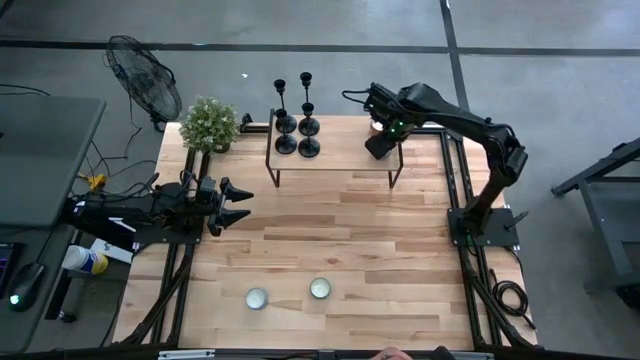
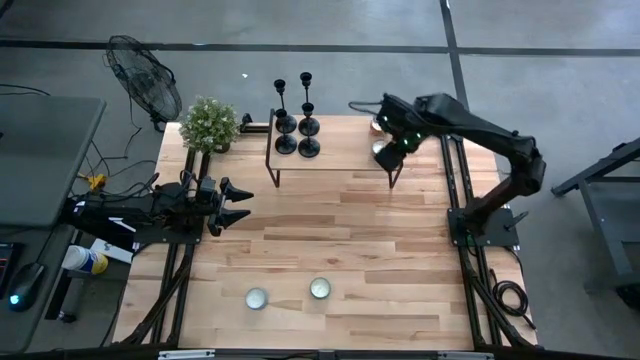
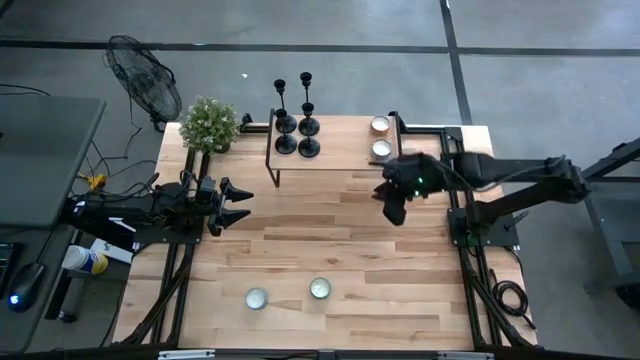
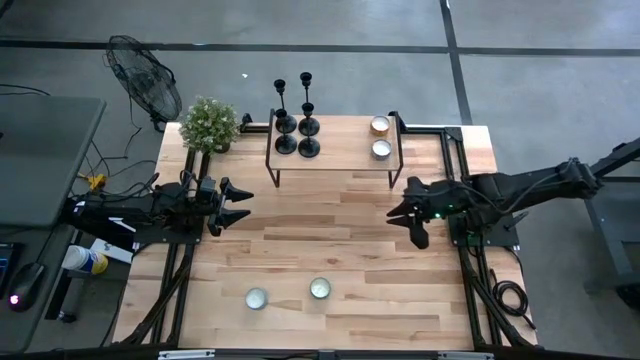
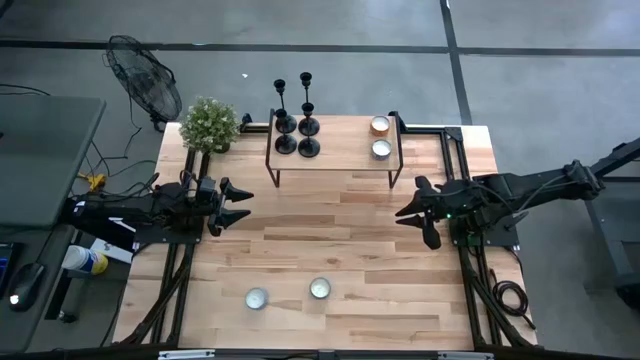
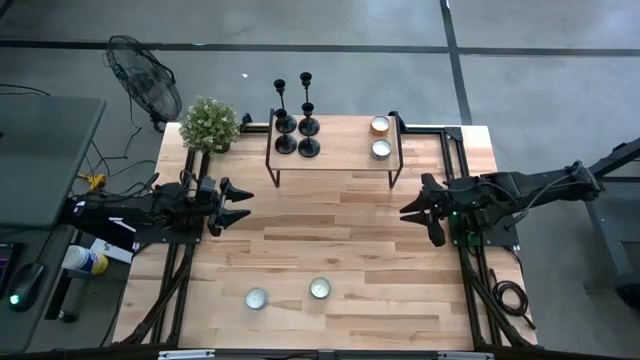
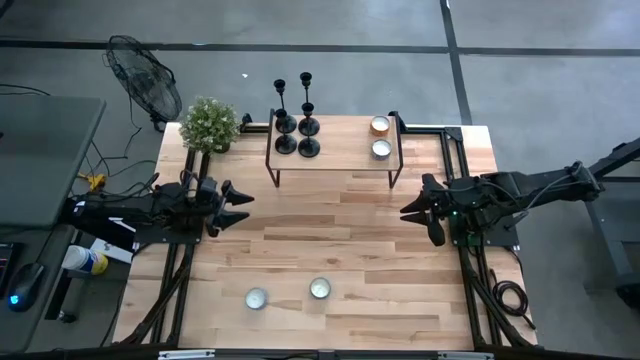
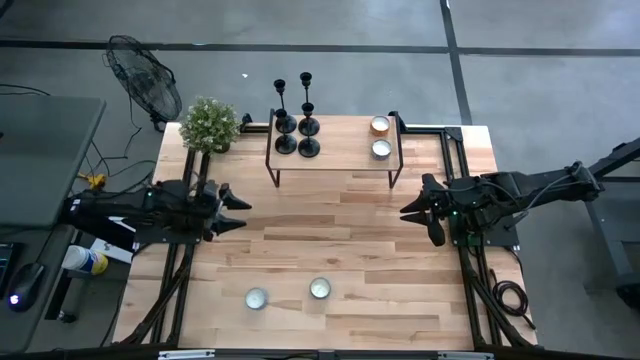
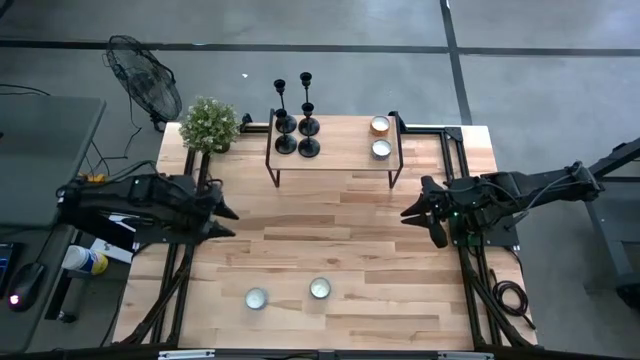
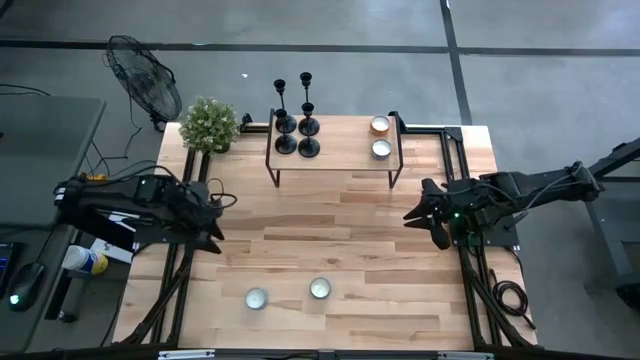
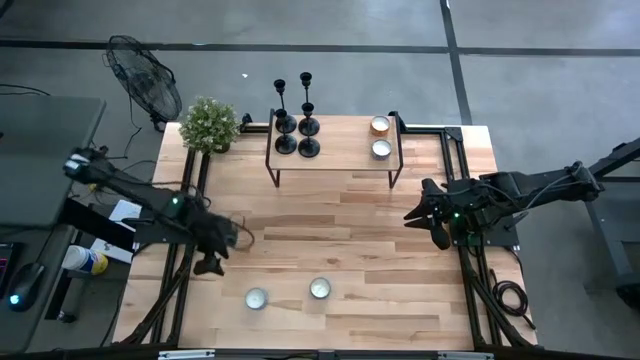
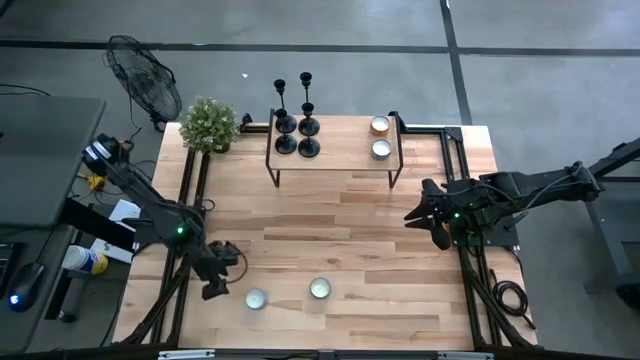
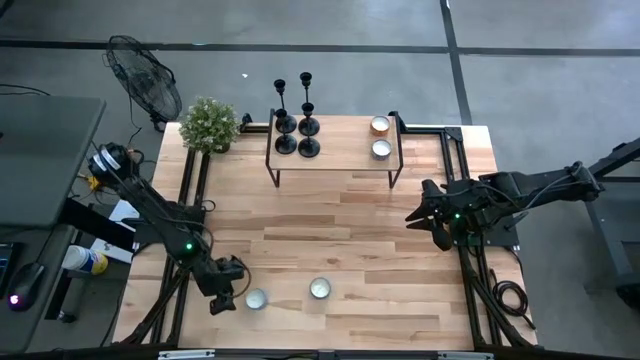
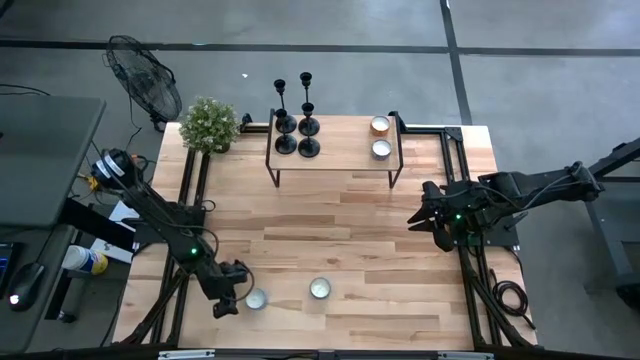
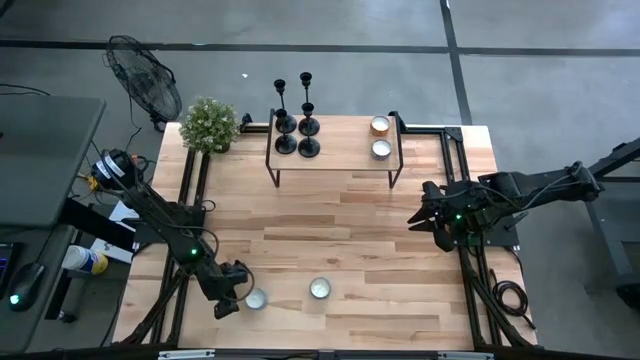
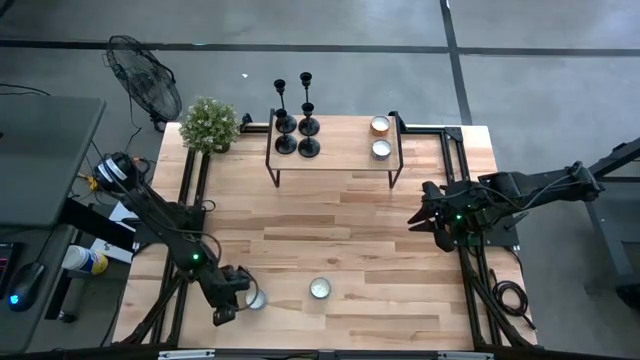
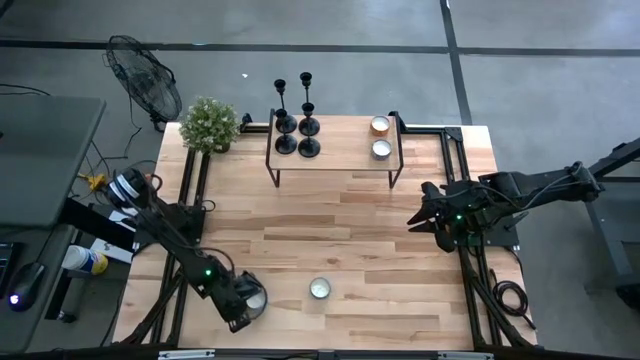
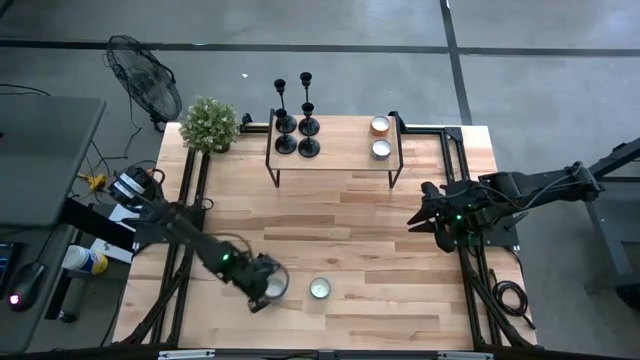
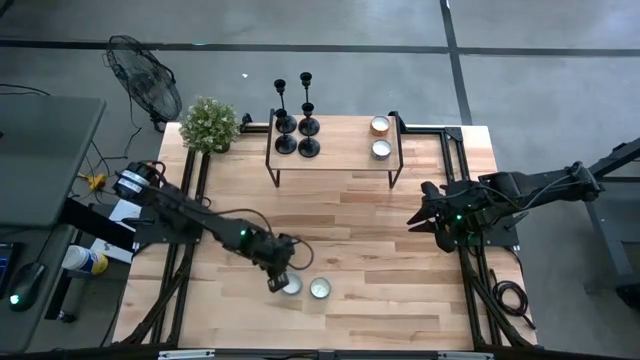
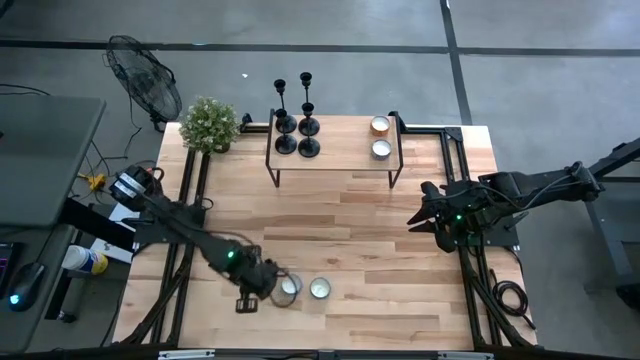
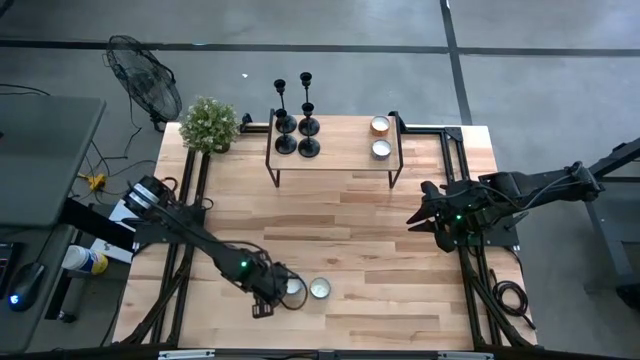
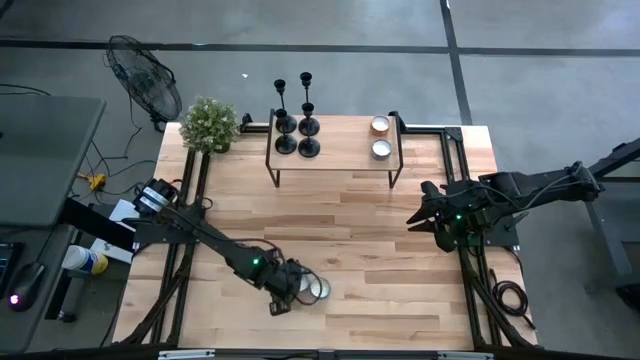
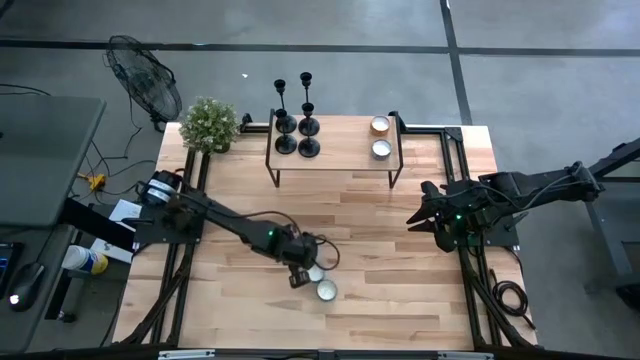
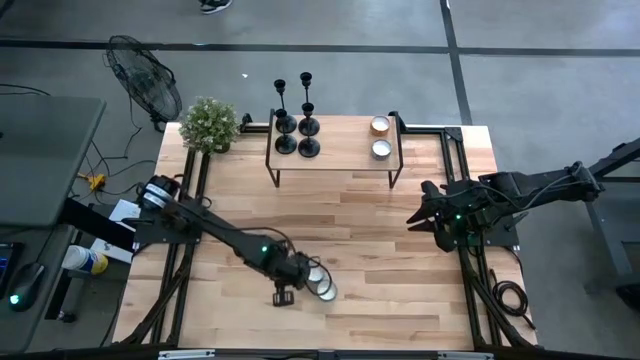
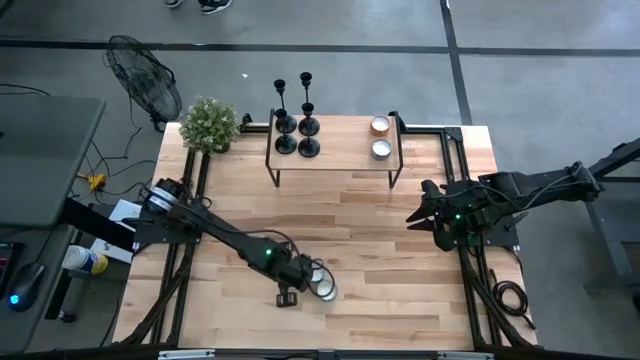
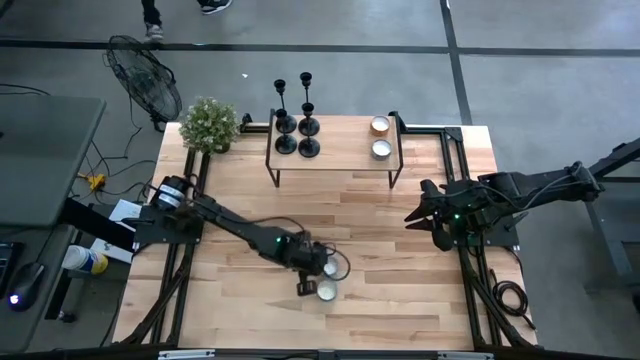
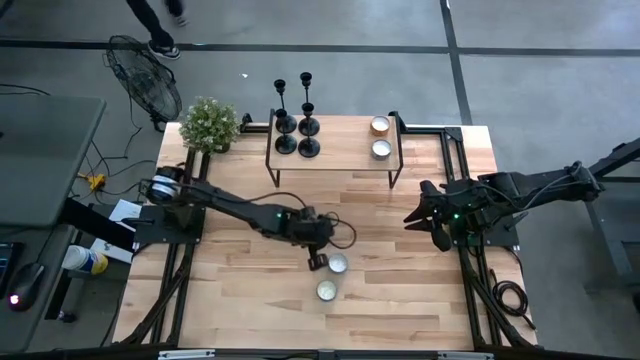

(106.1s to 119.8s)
Task: Pick & Place candle stick holders
Put the light blue scented candle on the shelf

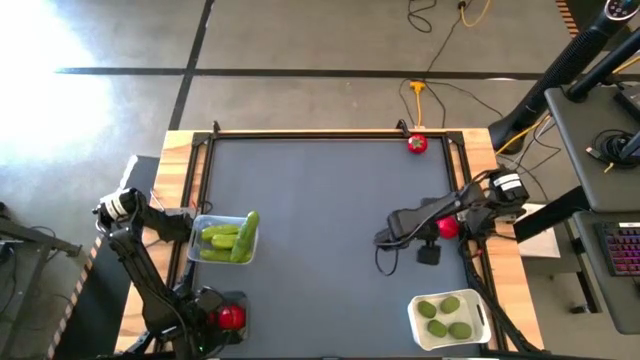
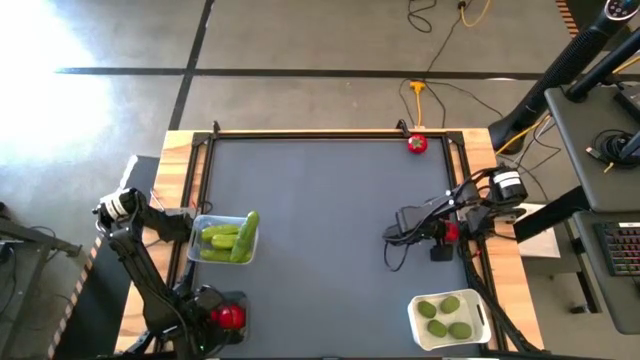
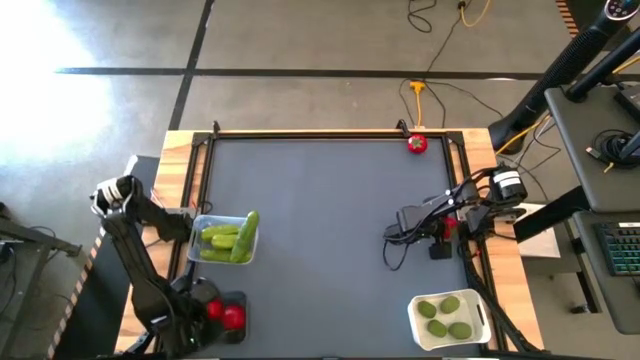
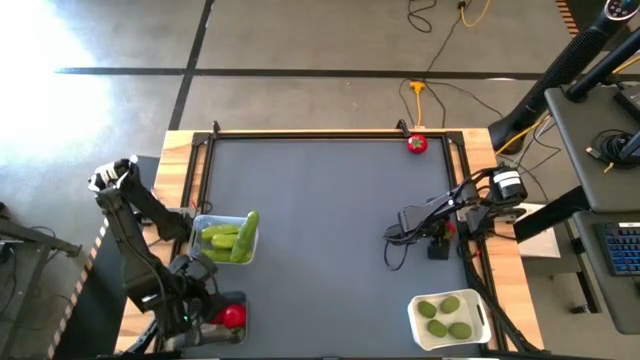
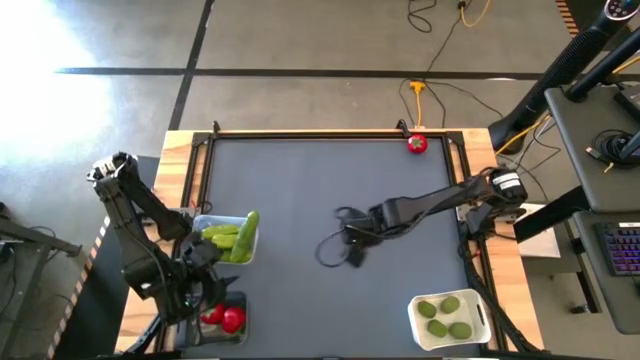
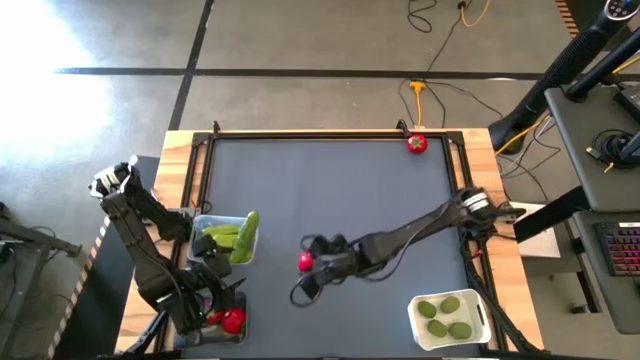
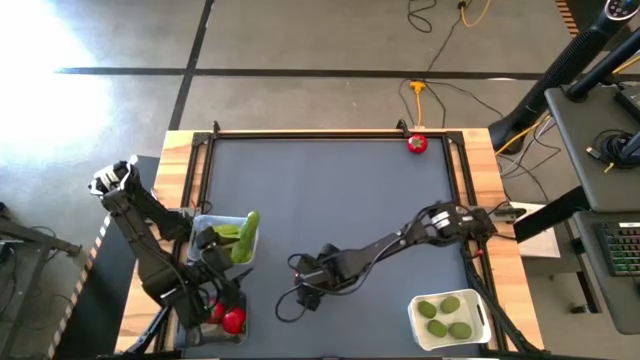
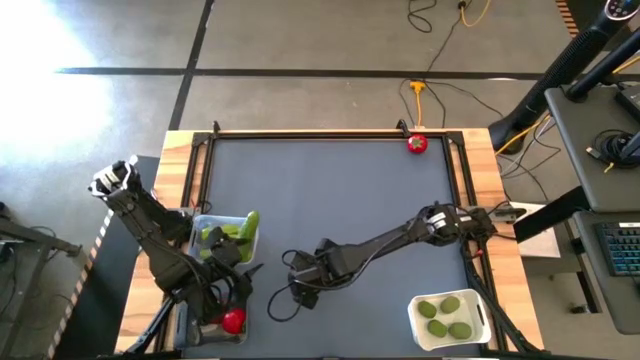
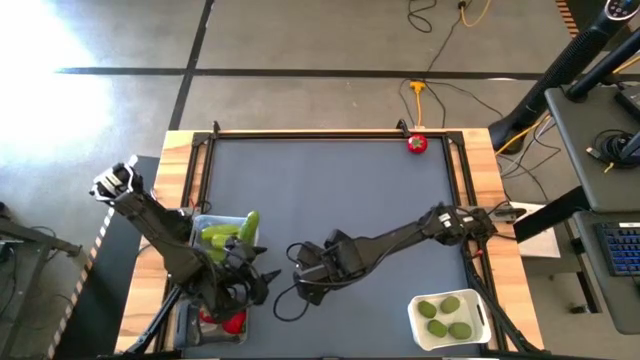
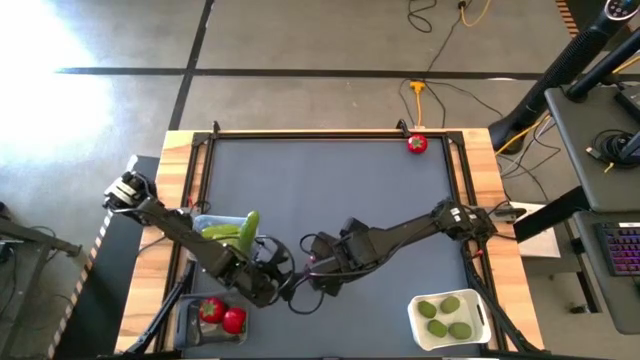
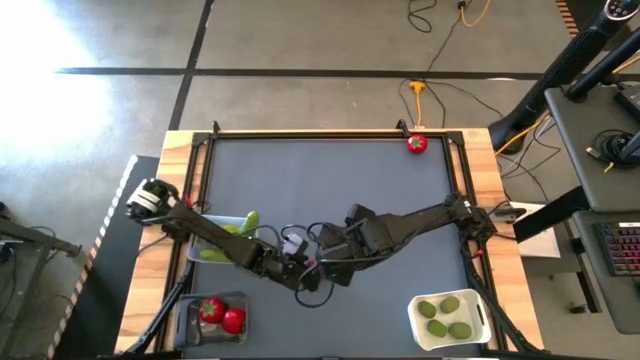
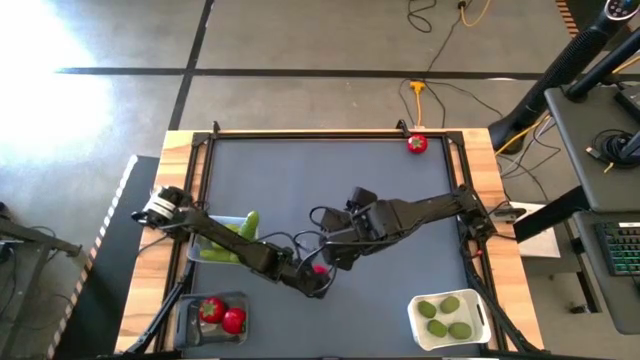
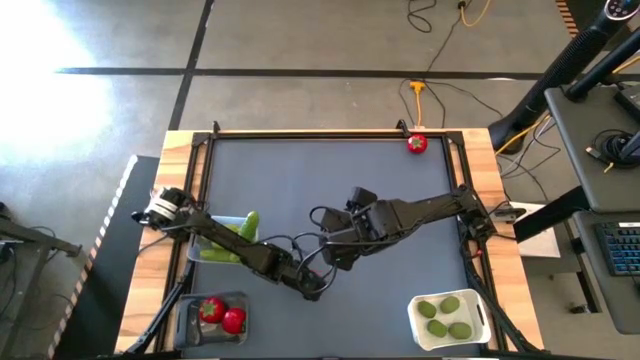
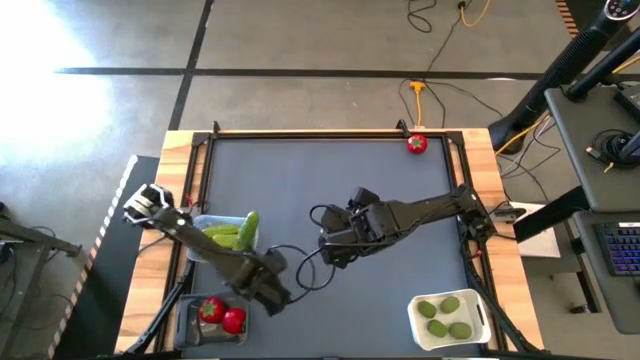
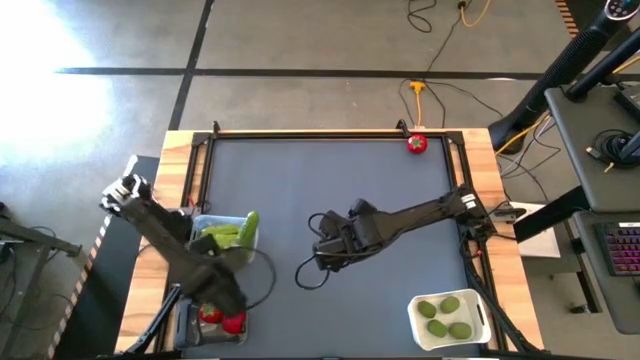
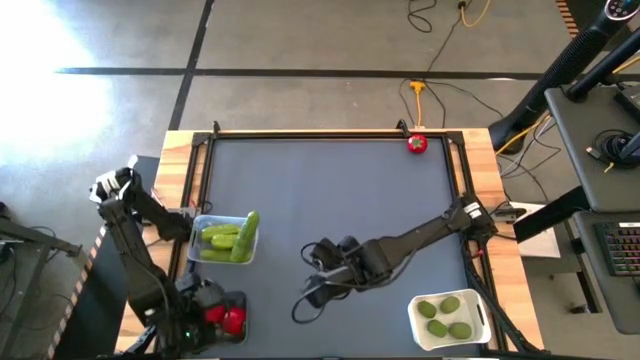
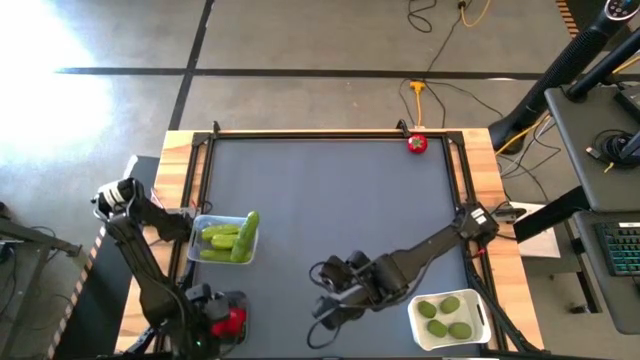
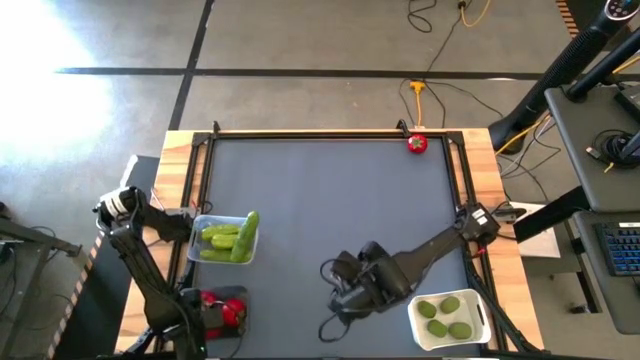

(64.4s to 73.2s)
Task: Sort produce into baskets
Put the bottom tomato into the black bin
